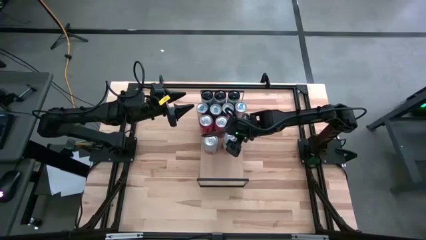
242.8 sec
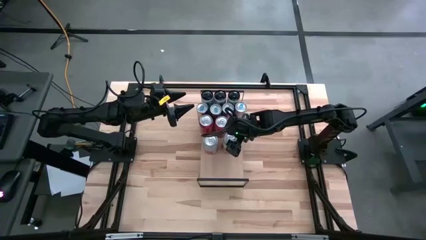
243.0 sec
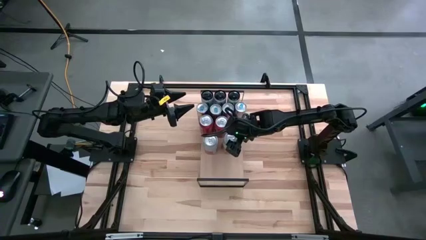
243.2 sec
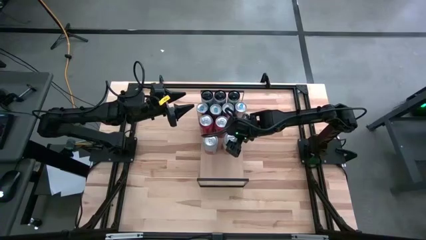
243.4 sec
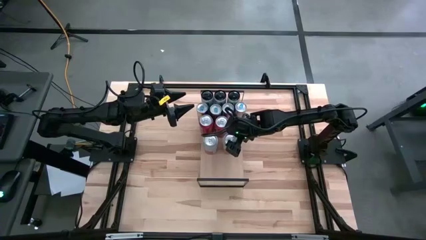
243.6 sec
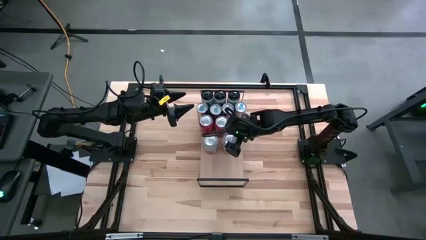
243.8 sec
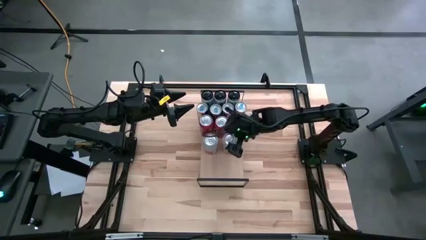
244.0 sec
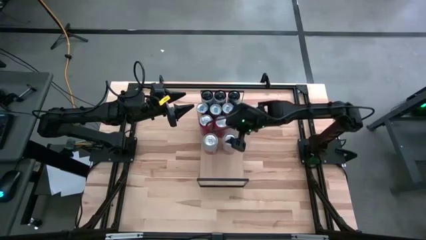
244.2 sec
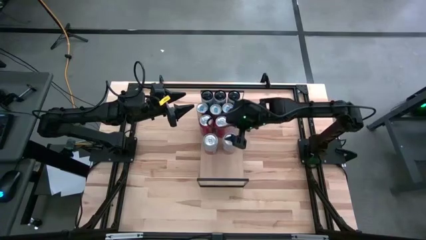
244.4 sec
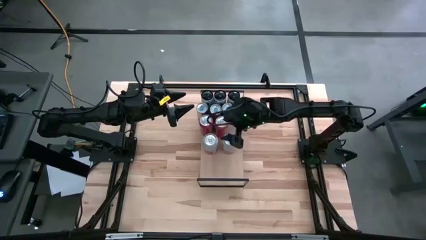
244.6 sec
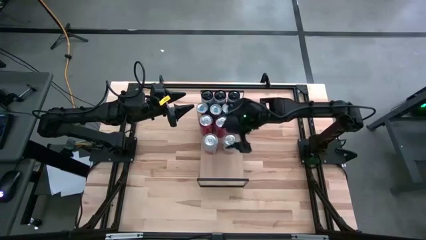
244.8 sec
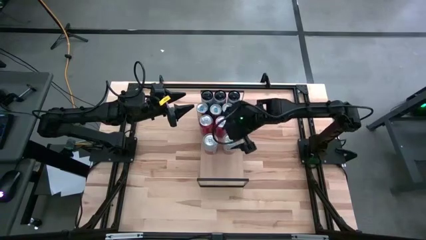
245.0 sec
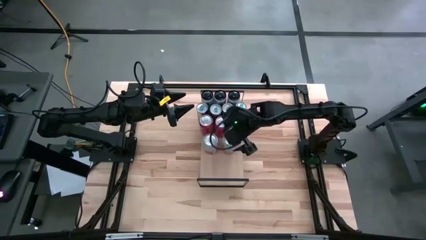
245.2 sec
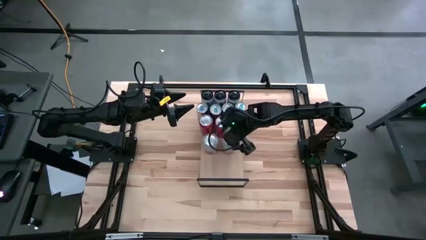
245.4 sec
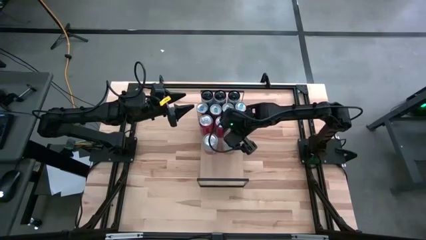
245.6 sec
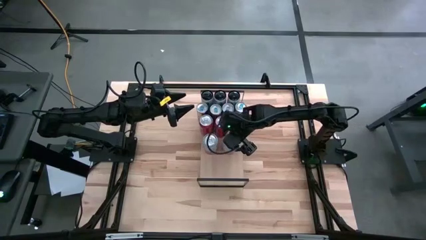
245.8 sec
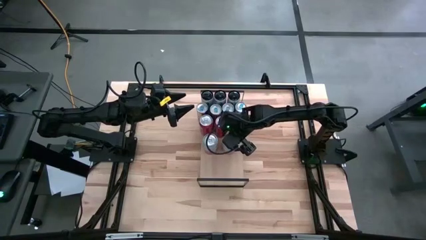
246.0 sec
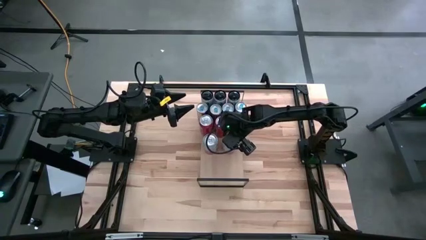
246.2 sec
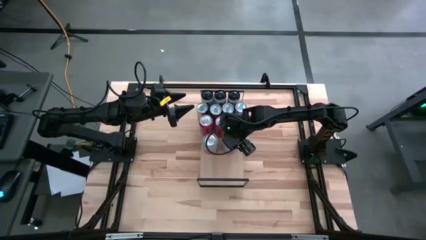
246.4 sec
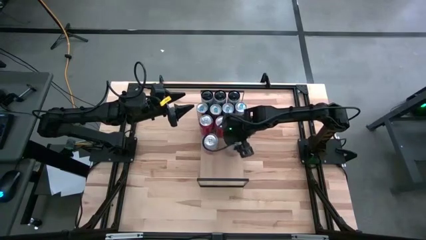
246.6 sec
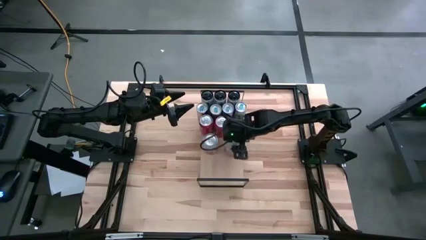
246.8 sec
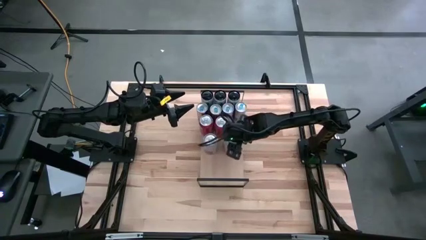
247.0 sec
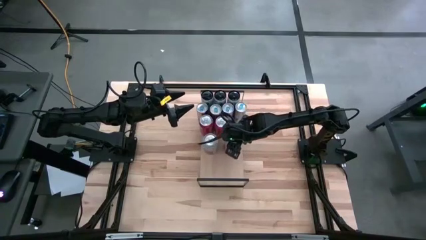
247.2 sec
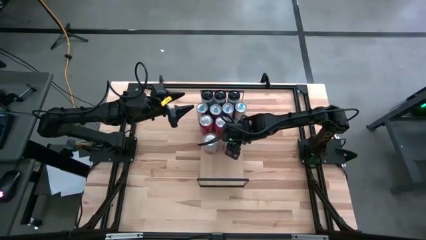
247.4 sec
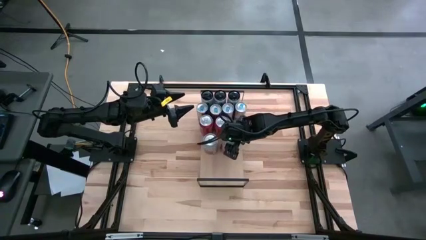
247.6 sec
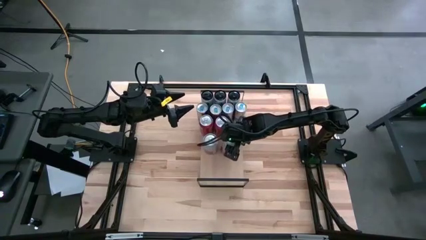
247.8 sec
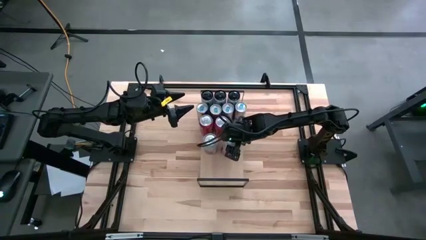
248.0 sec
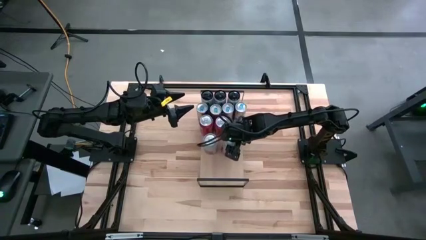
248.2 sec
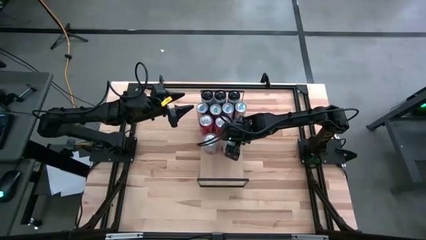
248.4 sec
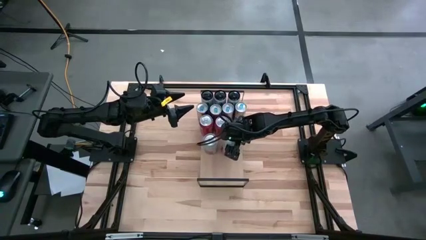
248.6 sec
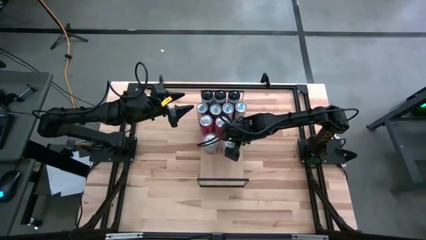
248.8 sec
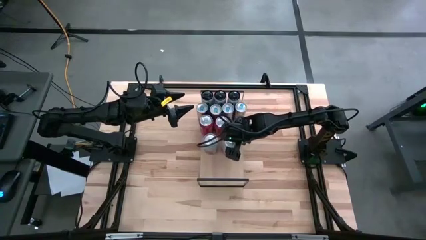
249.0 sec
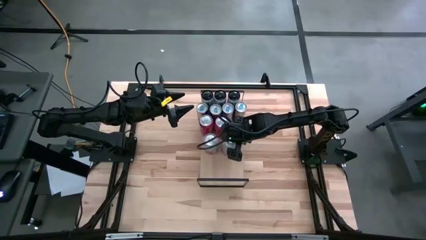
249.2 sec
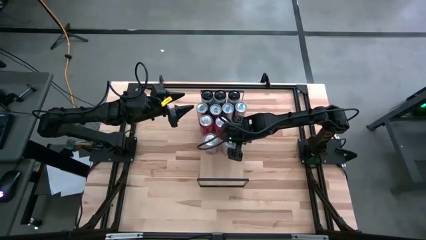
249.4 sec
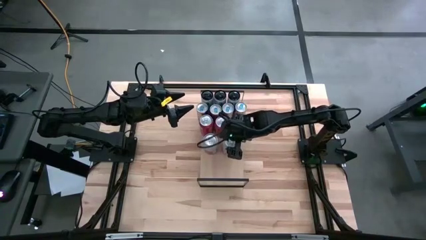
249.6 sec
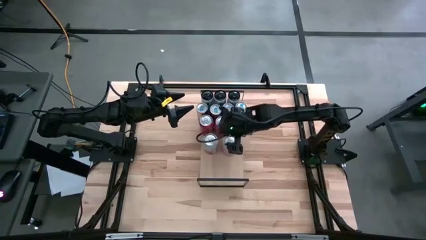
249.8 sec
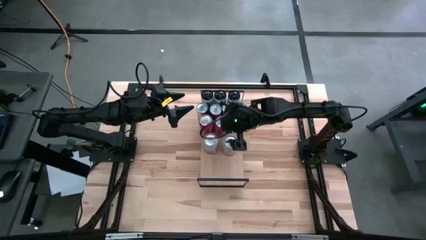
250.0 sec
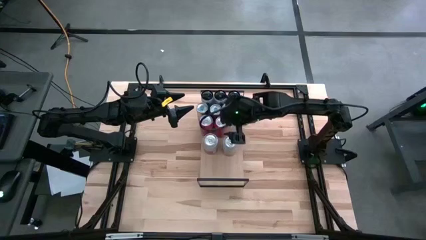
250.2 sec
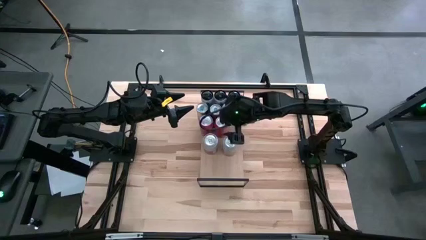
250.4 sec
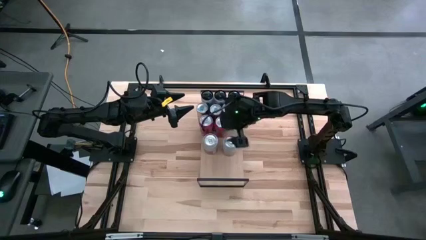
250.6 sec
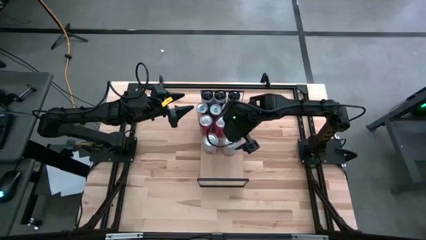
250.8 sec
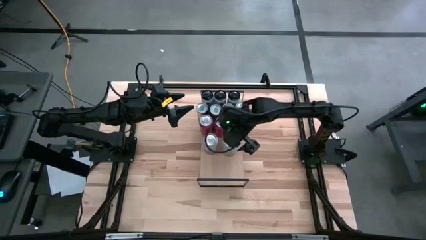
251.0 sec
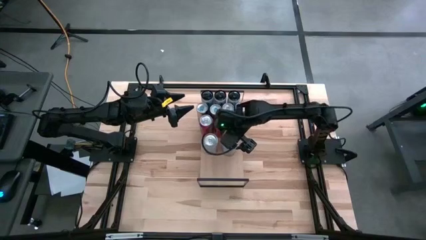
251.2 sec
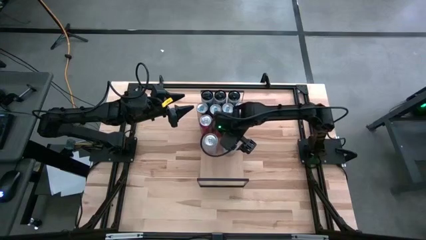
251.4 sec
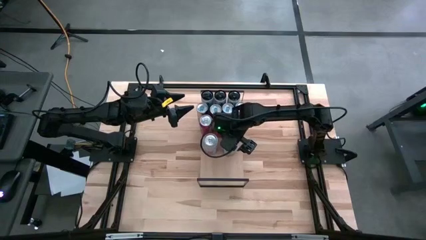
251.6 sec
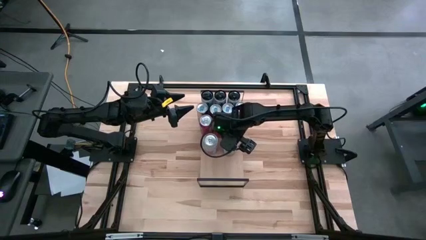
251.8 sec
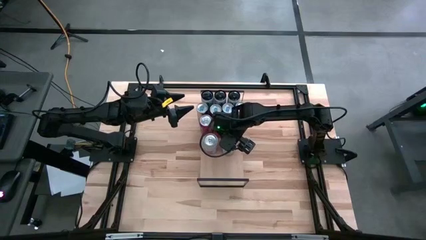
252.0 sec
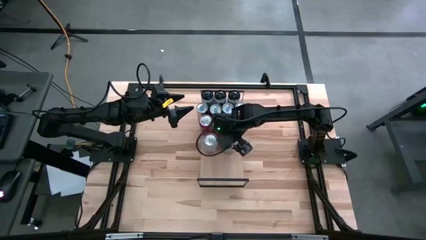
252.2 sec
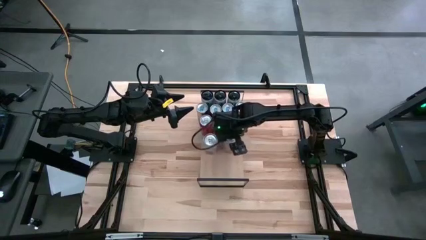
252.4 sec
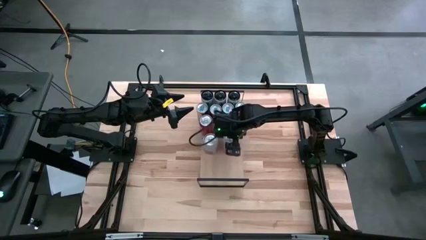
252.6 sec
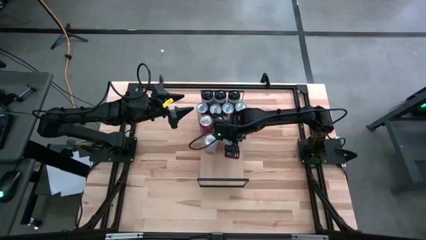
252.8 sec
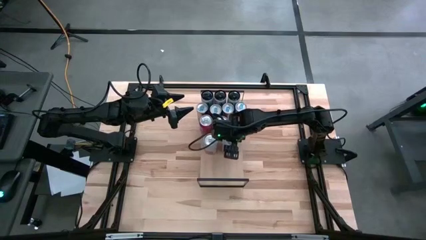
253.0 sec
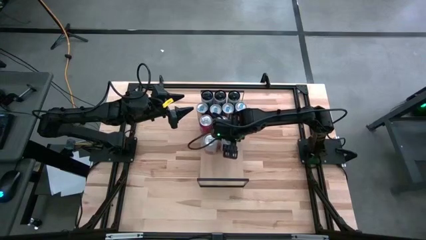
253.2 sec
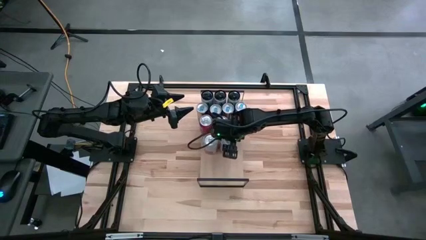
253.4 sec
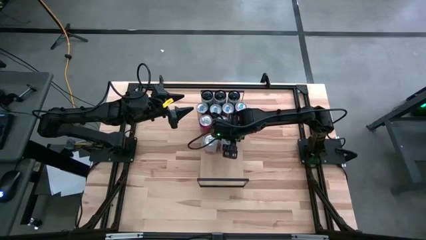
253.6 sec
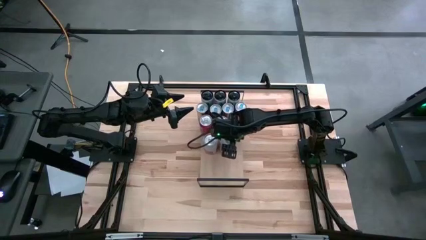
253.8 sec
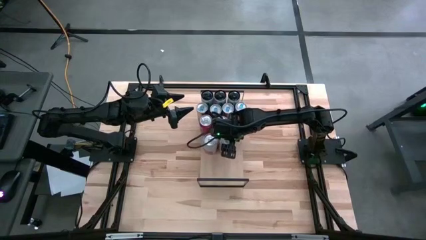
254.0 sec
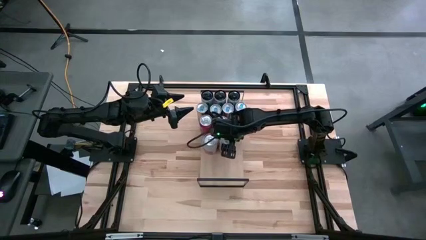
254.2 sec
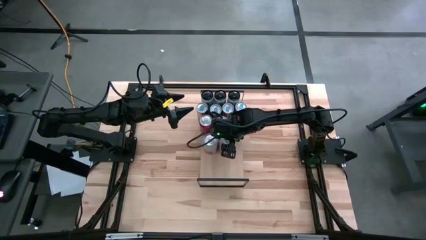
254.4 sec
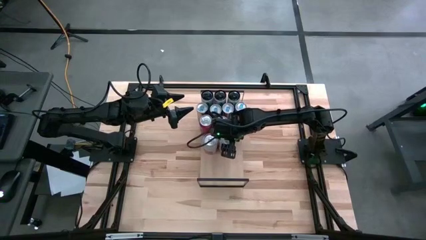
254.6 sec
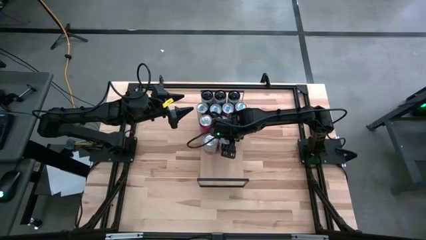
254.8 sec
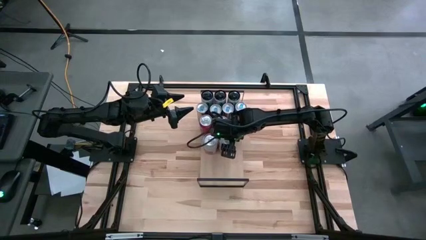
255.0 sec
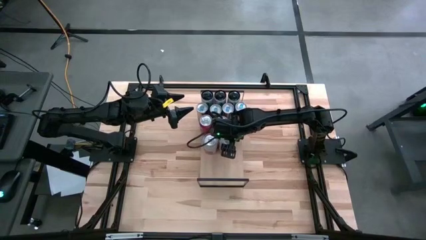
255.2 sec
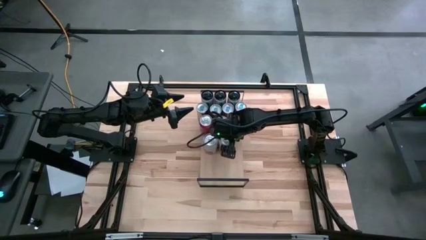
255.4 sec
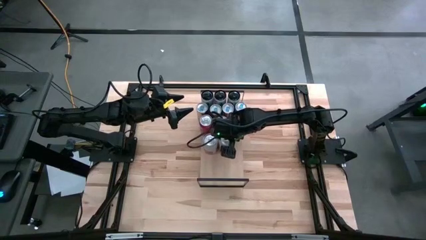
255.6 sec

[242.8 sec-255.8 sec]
Task: Place canned beverage on shelf
Put the pink-white soda can on the shelf aligned with the other pink-white soda can

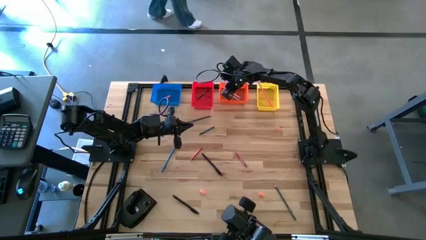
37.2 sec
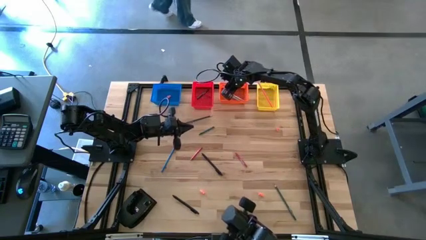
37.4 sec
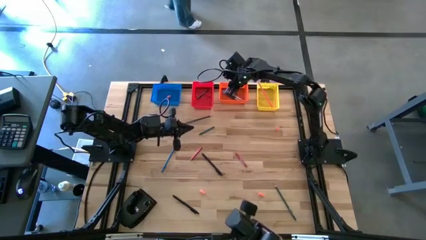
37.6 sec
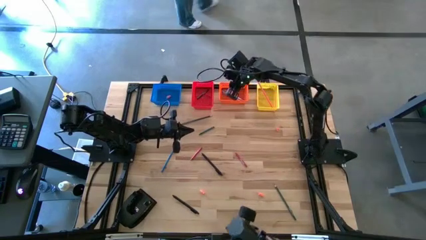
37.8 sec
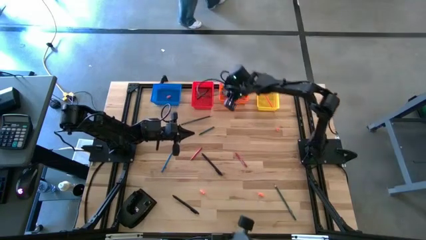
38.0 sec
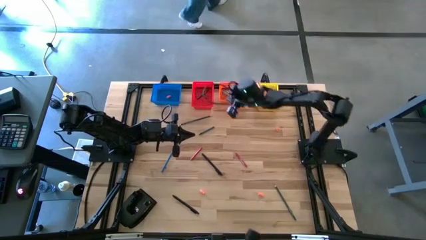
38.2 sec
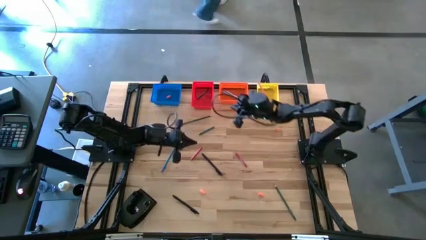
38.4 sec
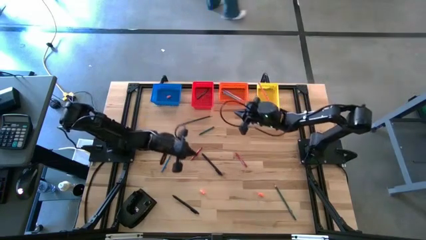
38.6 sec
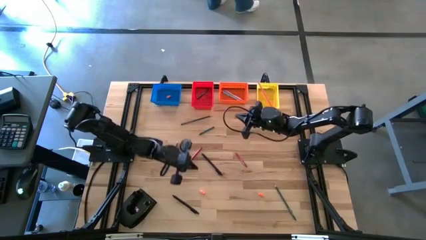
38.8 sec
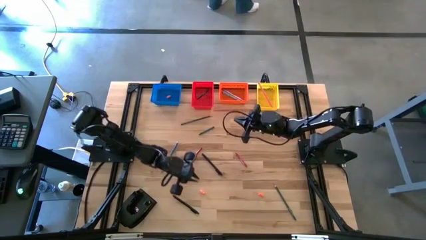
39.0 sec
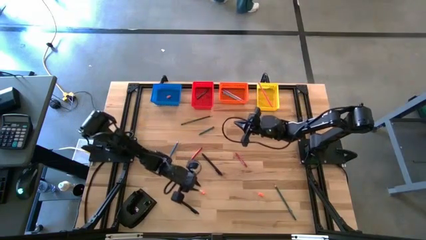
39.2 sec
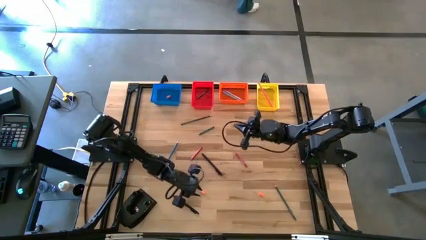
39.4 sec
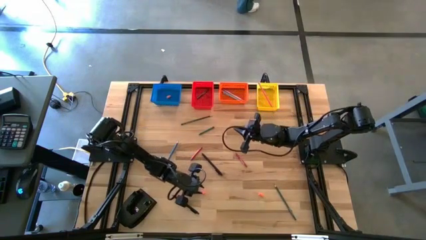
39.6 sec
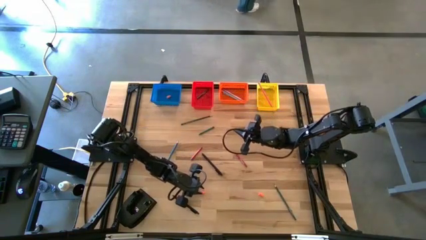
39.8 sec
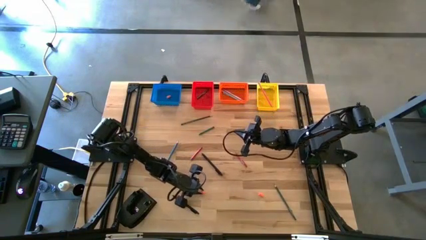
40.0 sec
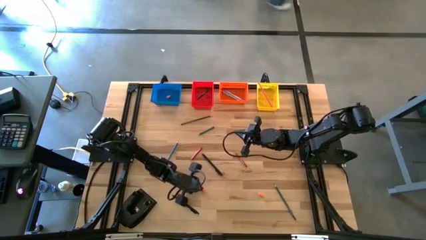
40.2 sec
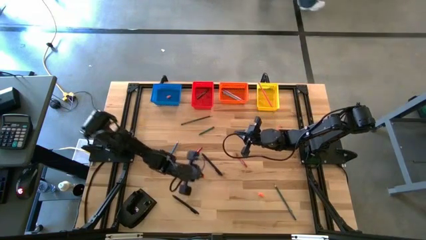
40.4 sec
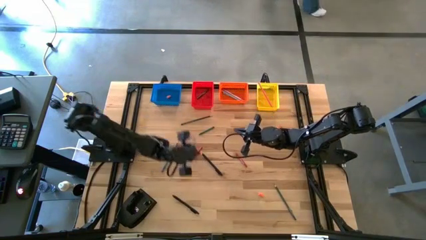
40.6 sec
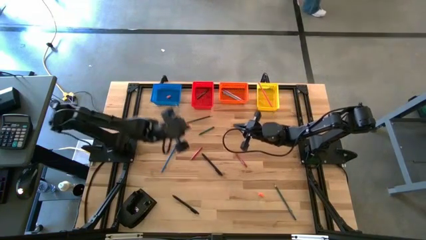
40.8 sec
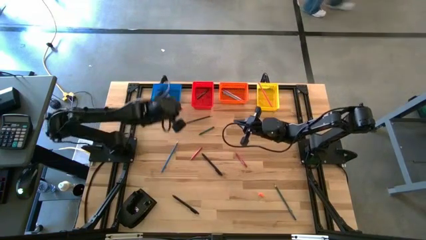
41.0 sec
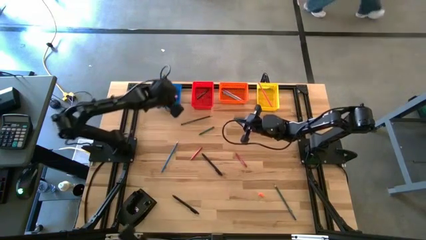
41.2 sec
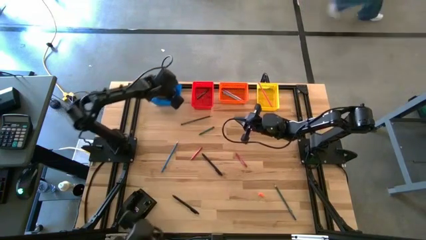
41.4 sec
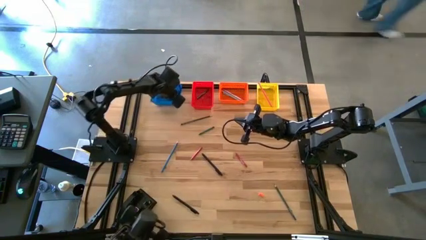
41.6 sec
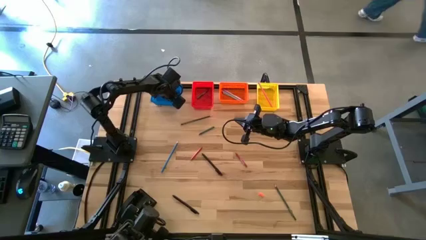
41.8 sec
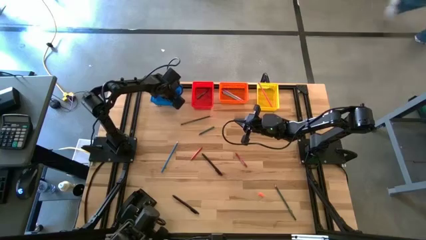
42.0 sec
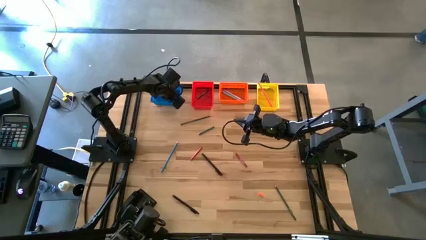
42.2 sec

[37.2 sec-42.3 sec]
Task: Sort crayons/erasers/pens/pencils in bins
Put the orange eraser into the blue bin
